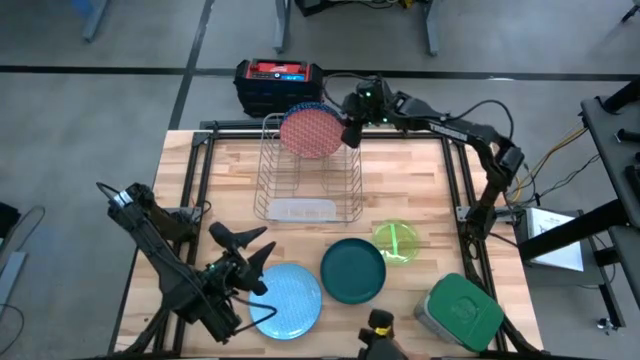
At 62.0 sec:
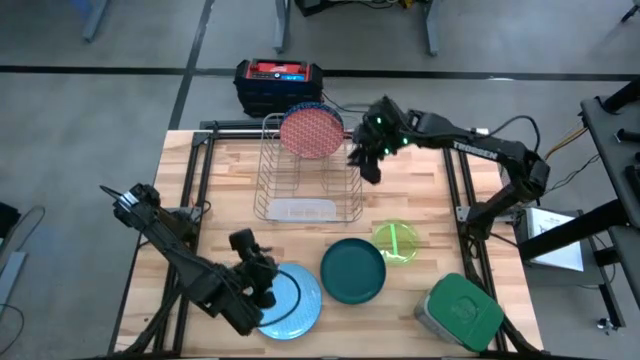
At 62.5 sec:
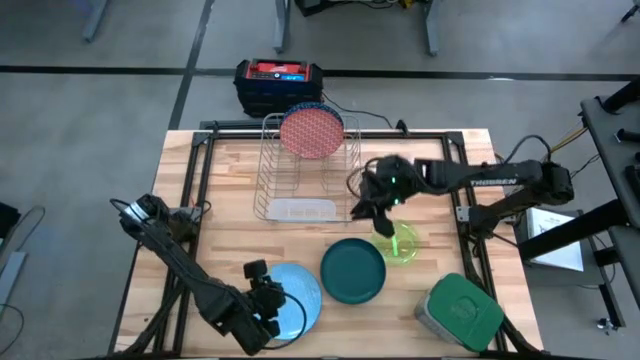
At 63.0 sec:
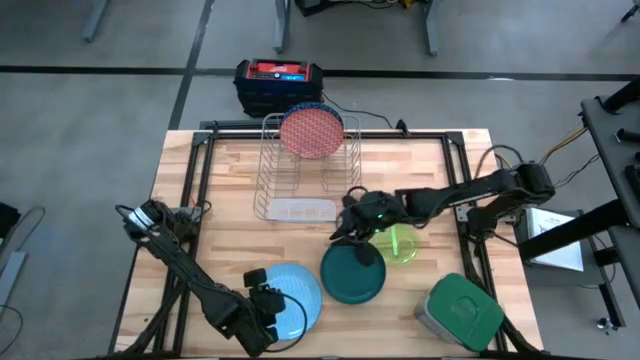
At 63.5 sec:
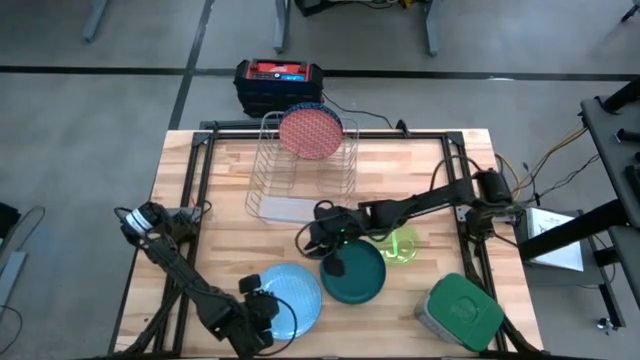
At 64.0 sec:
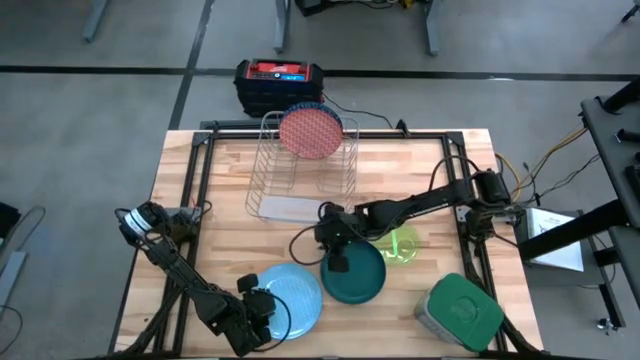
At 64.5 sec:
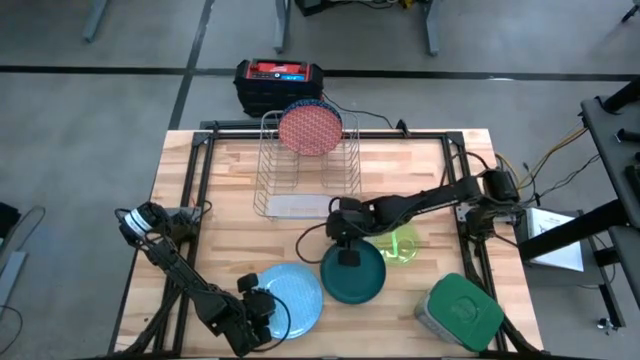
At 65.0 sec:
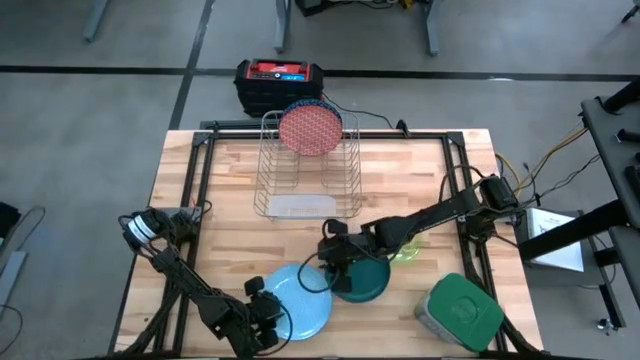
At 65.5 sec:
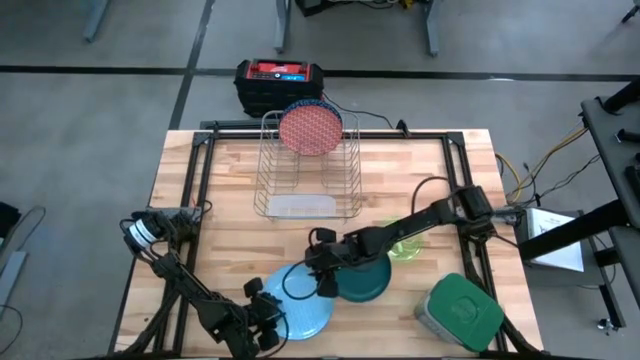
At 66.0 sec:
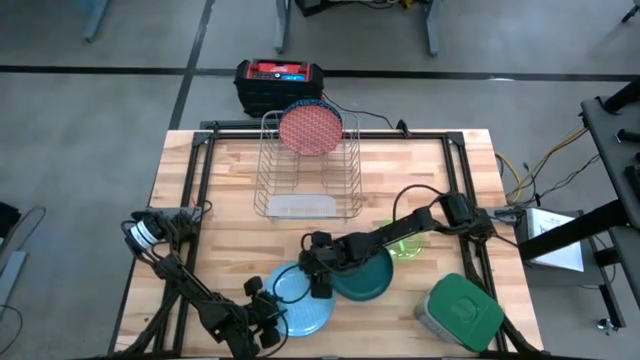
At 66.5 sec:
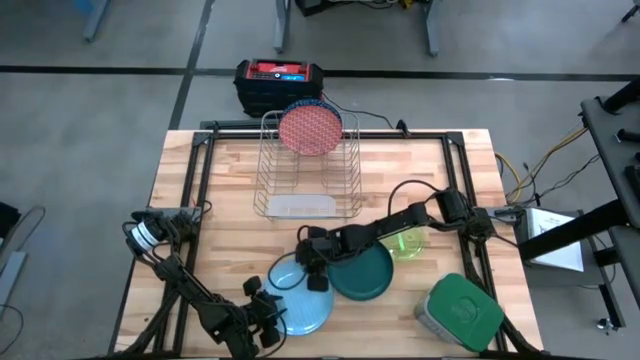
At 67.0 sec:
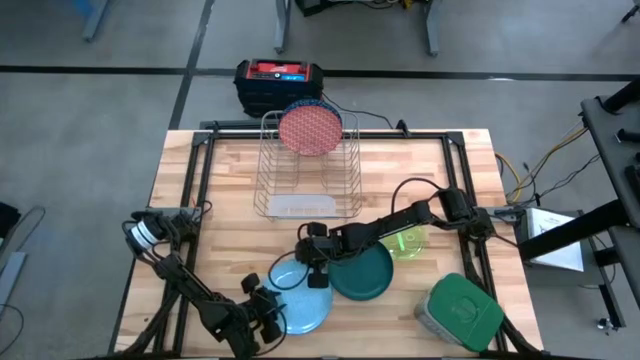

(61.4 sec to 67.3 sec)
Task: Sort dishes
Put the light blue patterned plate into the dish rack

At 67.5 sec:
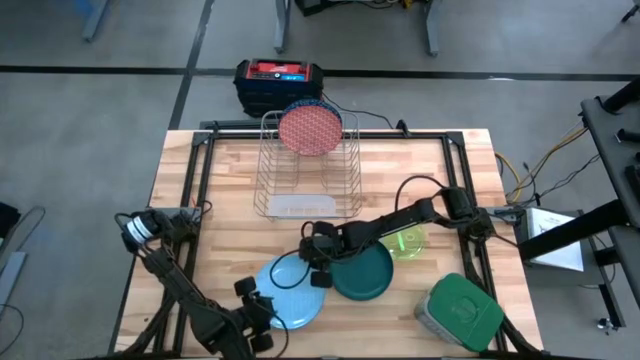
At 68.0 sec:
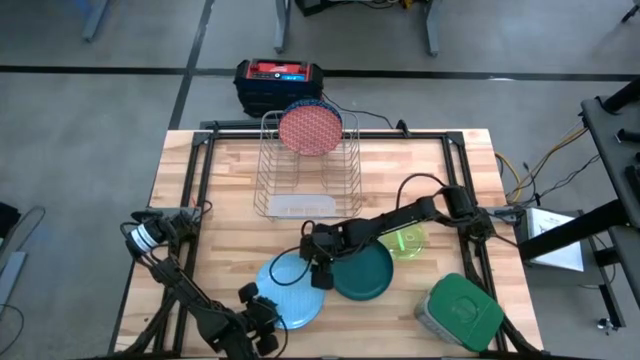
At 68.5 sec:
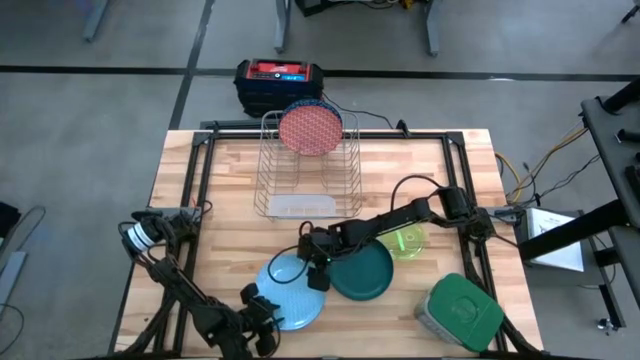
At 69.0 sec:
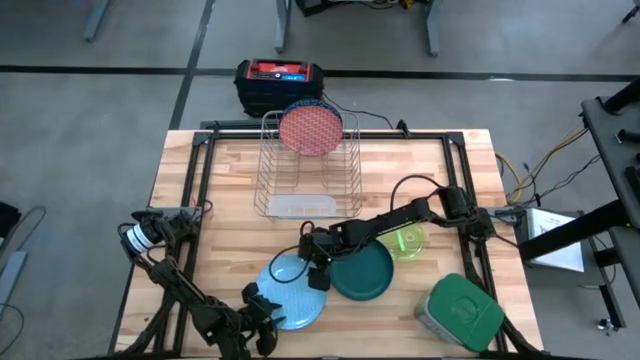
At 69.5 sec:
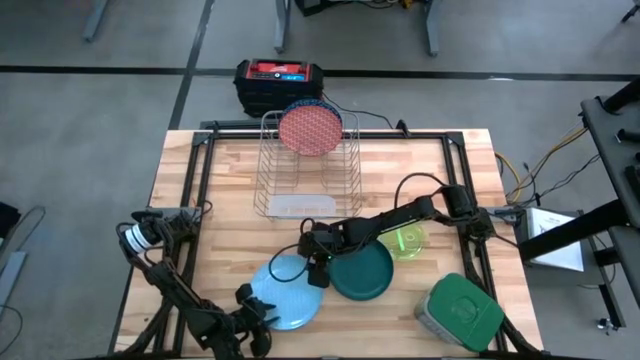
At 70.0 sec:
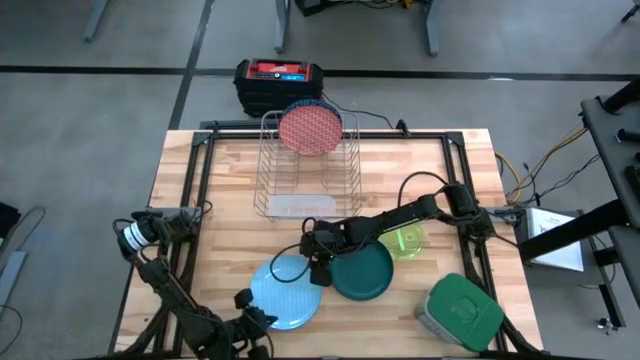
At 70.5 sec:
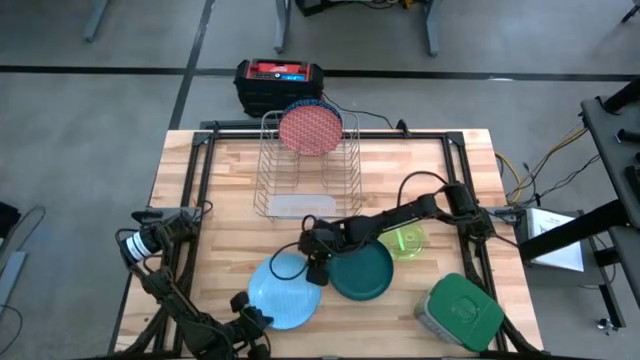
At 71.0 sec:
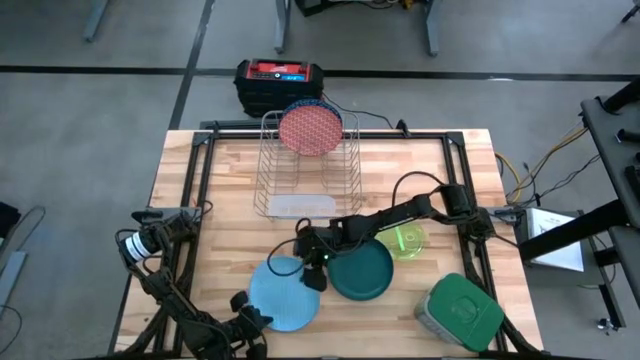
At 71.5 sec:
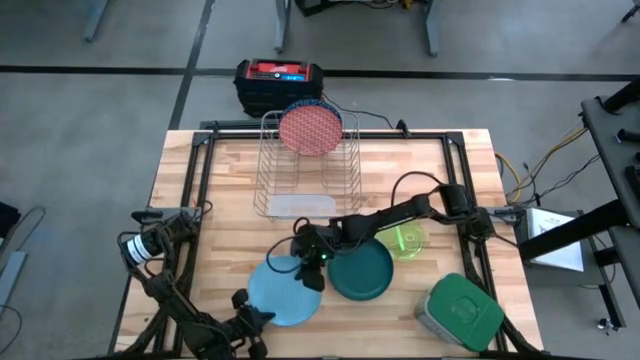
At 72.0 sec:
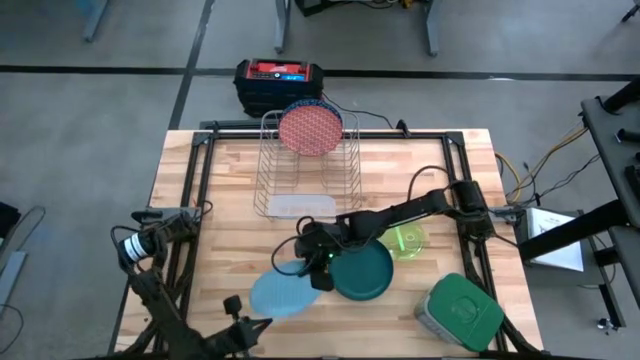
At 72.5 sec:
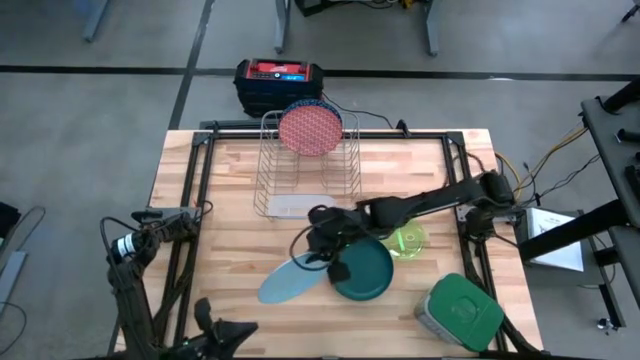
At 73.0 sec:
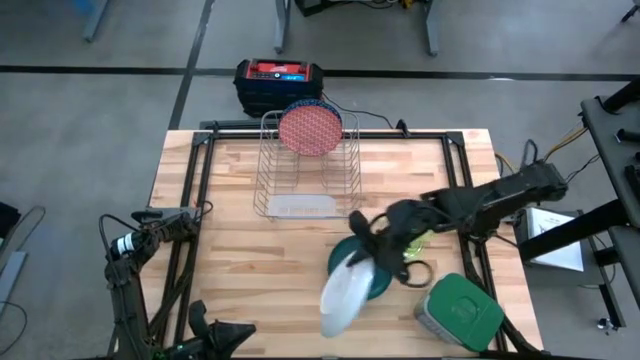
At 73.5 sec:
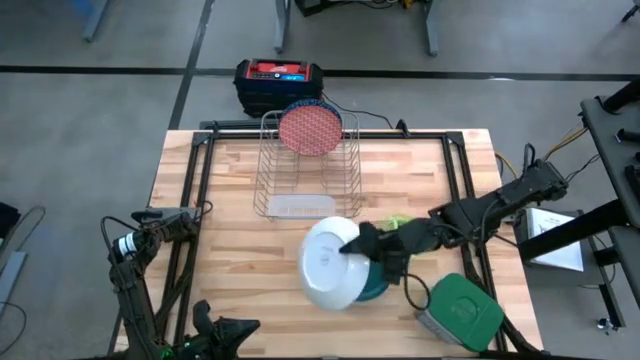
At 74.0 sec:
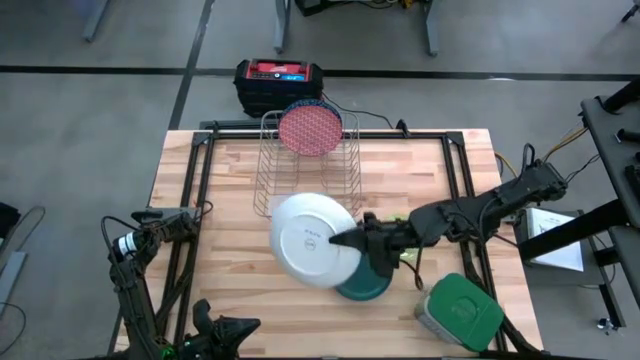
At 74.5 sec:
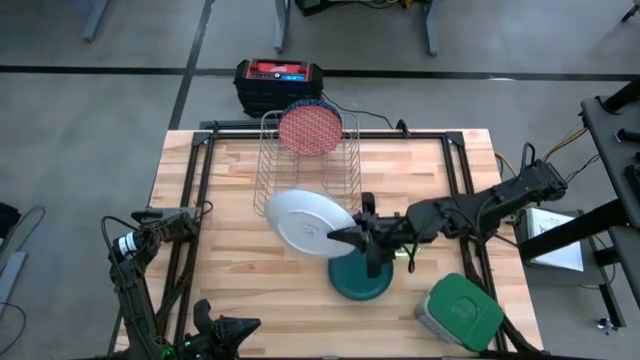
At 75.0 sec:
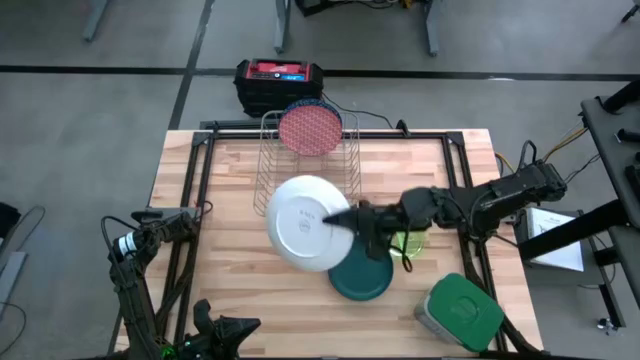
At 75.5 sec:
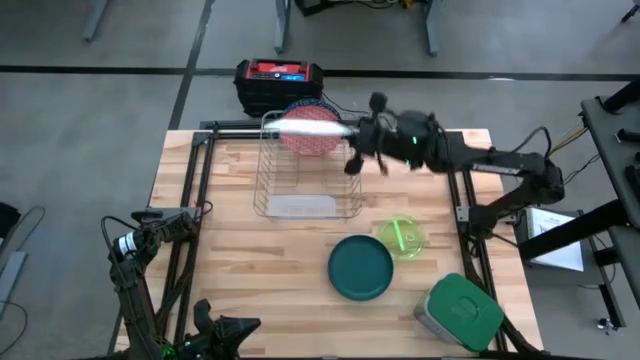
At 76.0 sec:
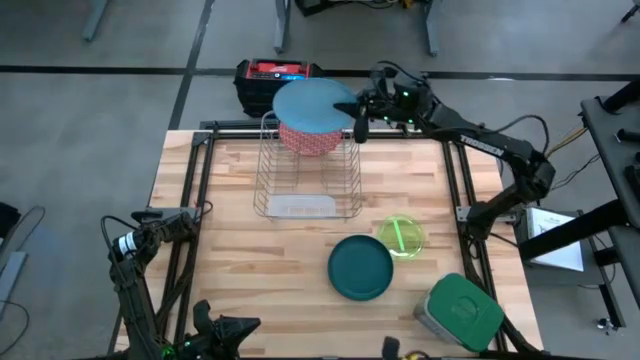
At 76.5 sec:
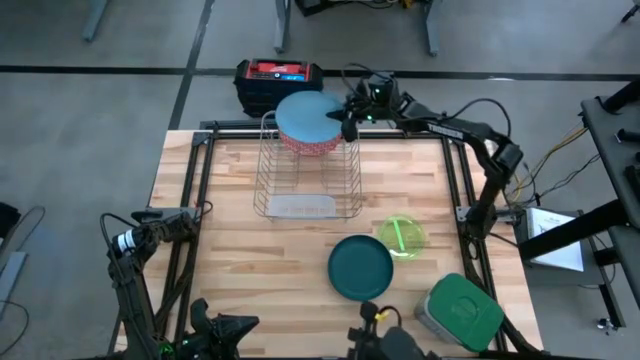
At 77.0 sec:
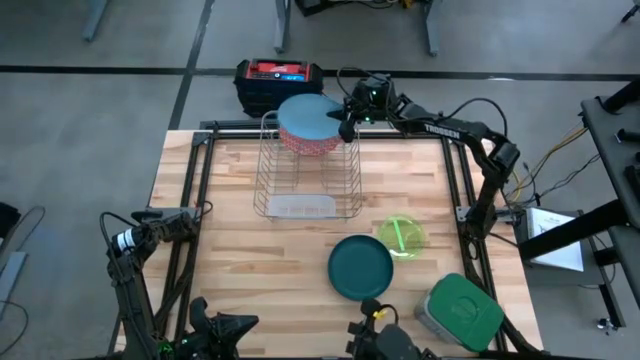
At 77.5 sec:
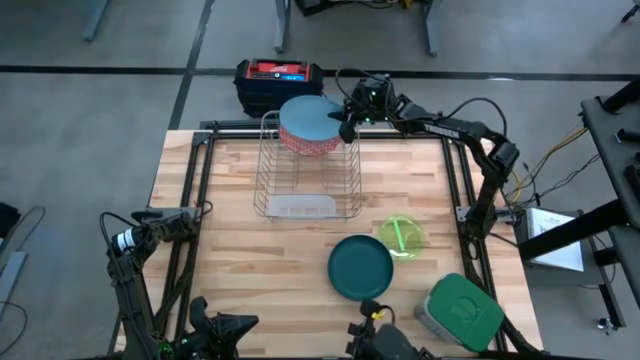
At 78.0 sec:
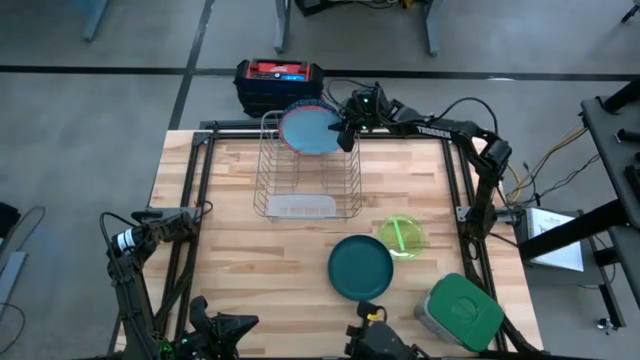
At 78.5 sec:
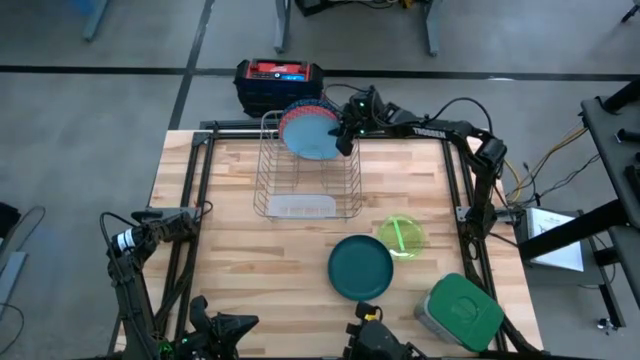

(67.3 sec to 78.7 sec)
Put the light blue patterned plate into the dish rack

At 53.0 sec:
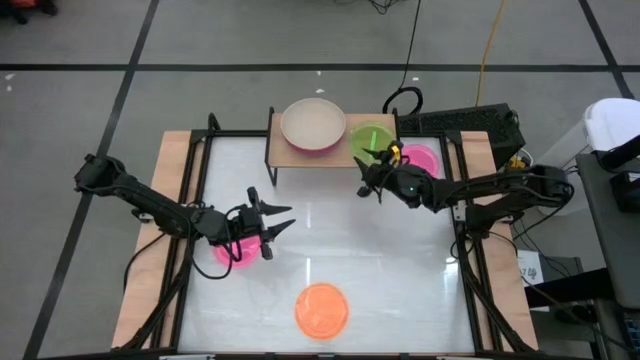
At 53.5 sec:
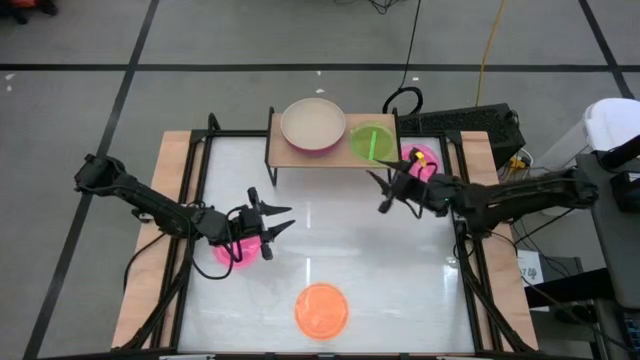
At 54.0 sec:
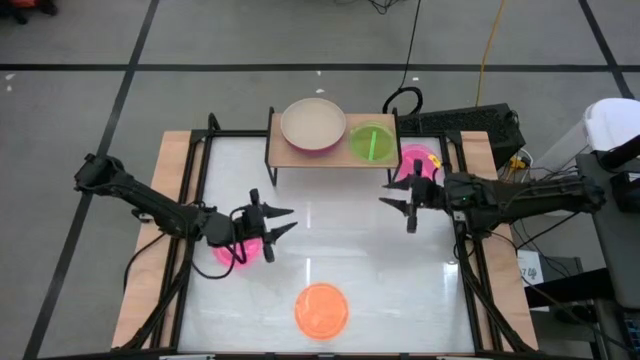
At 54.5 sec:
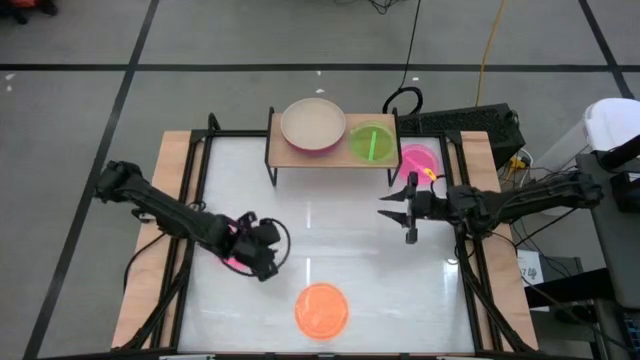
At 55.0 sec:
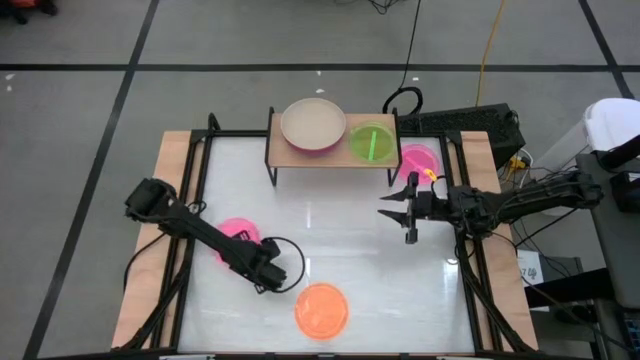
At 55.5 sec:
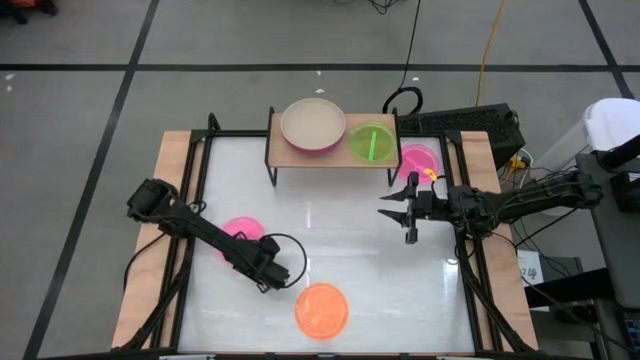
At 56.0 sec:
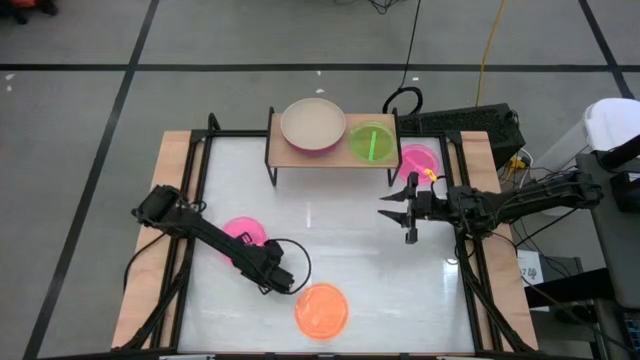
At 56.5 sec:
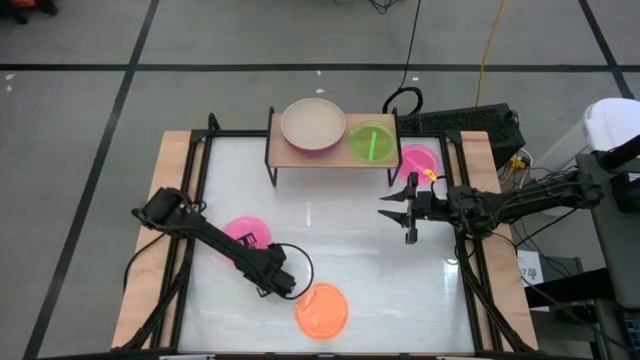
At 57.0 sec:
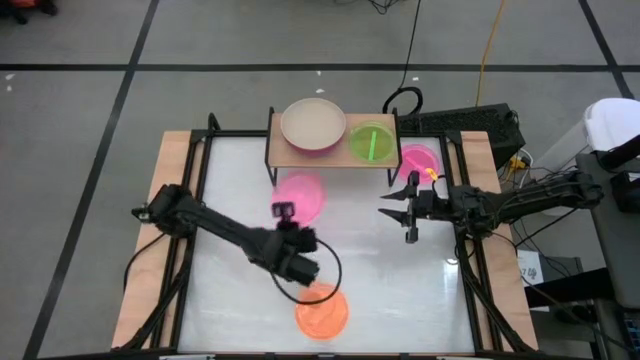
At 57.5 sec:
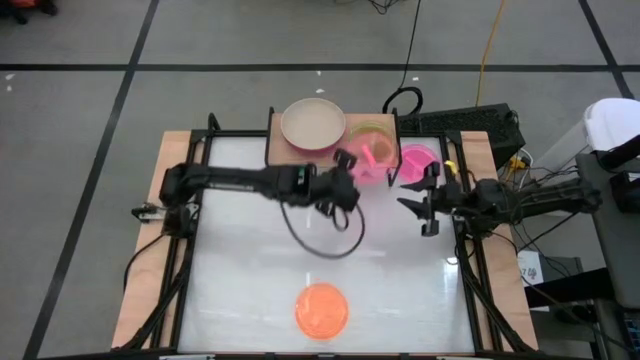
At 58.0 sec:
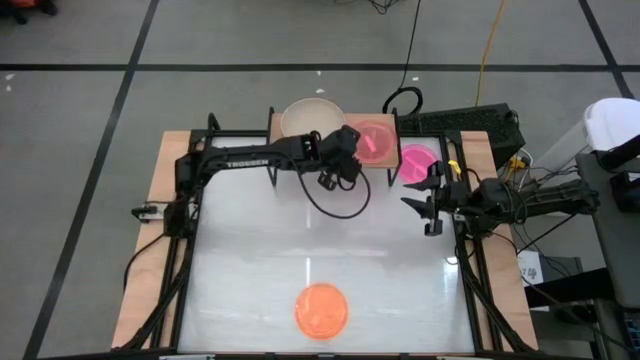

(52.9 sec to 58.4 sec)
Task: Place and stack plates onto a shelf
Stack the left light pink plate on top of the green plate
